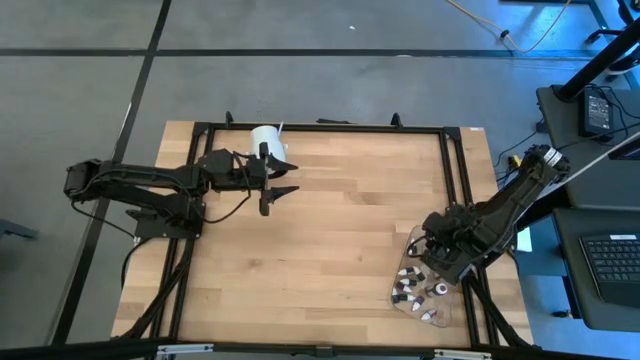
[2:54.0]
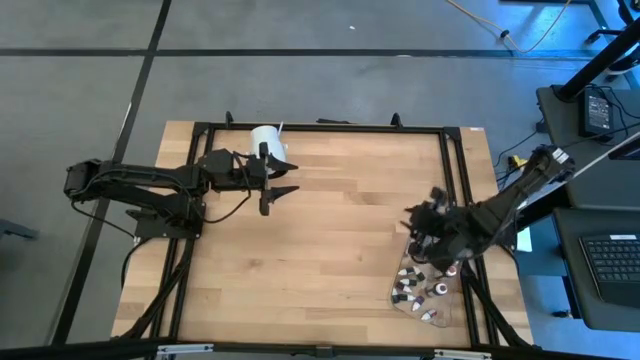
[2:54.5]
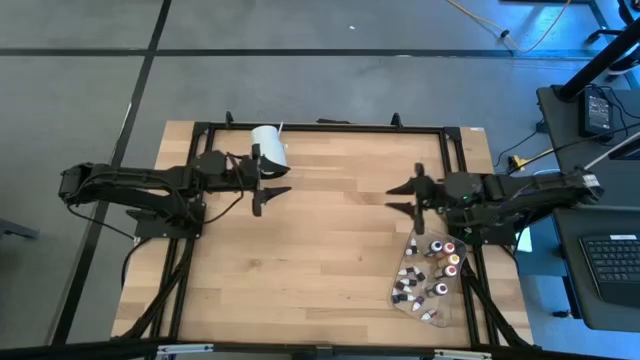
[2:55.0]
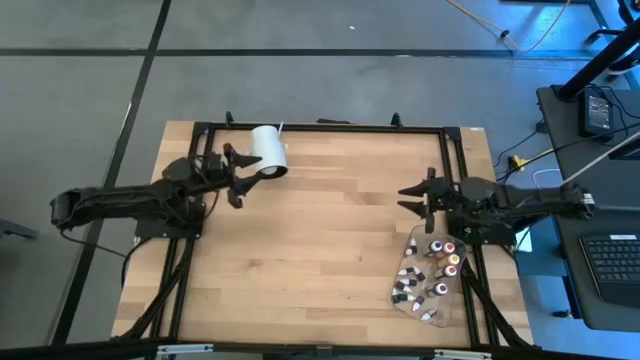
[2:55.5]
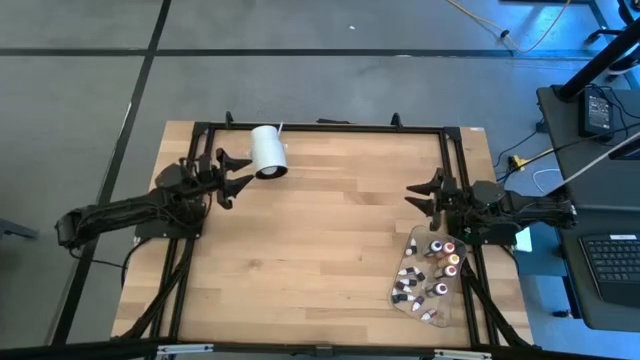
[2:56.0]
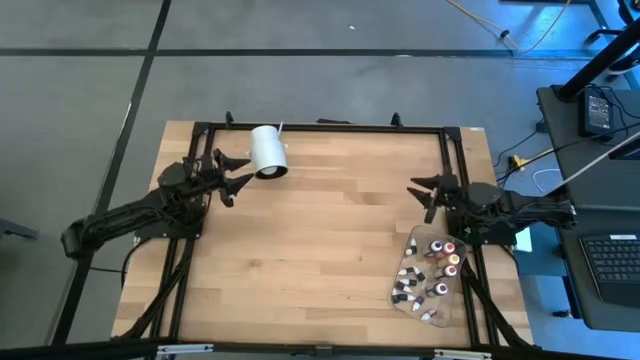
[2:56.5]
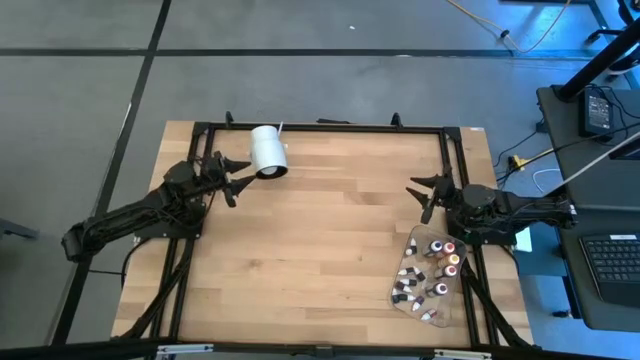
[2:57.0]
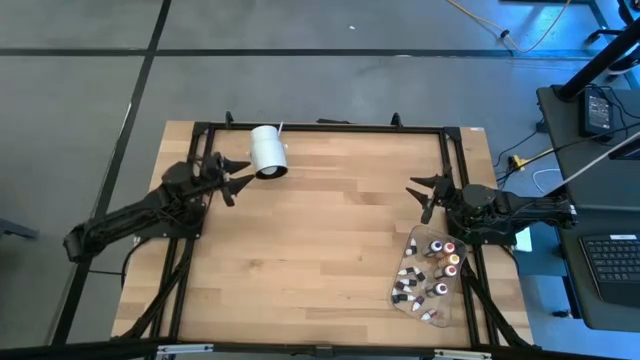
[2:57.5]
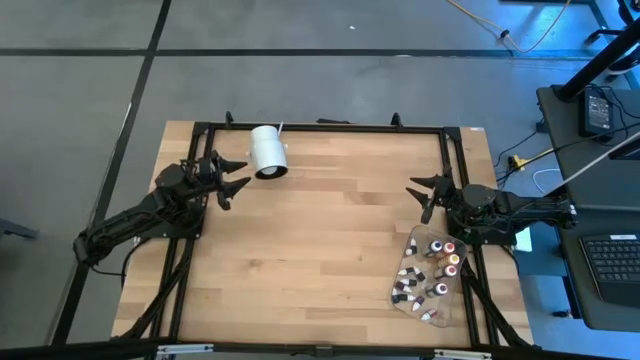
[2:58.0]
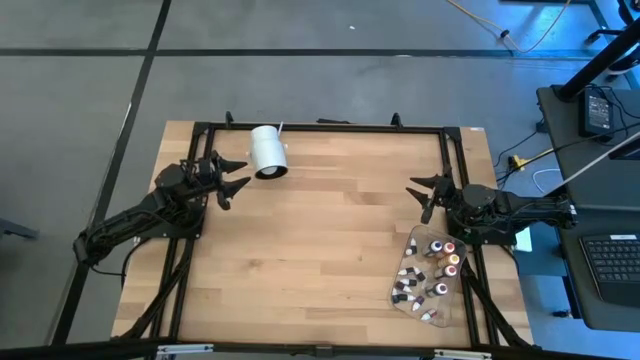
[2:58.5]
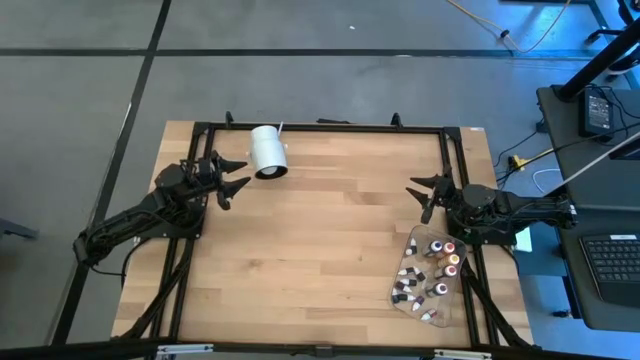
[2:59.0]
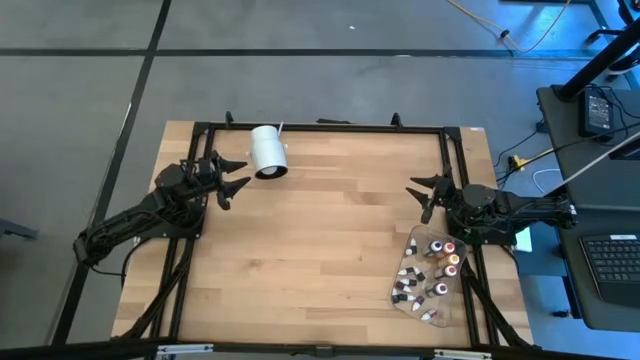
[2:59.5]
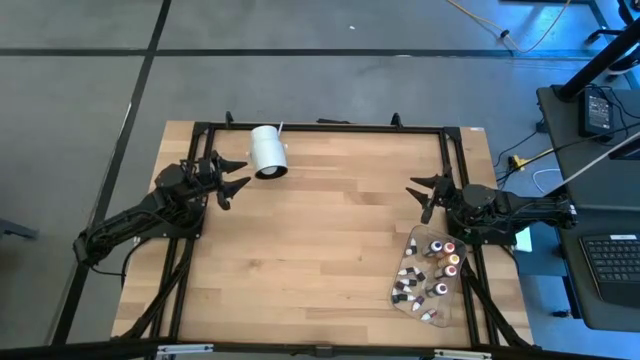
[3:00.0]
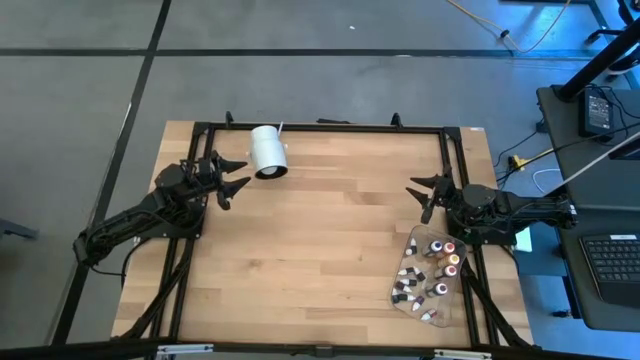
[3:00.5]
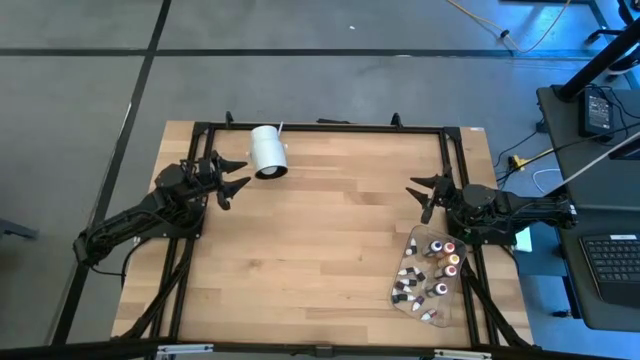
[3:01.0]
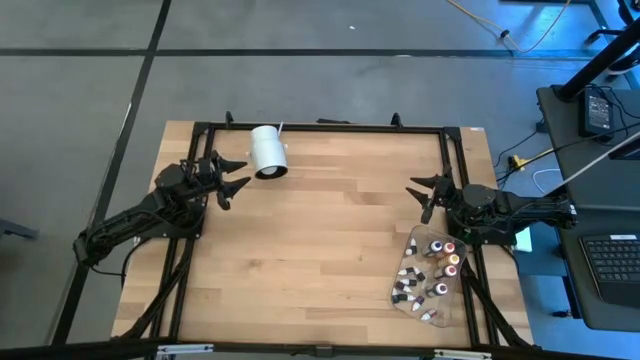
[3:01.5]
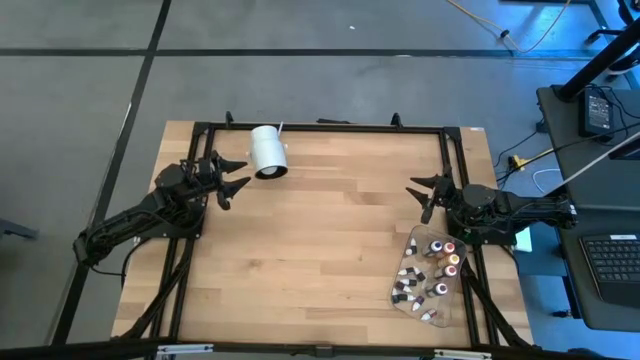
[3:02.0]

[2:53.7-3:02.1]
Task: Pick & Place food coloring
Return to Home Position

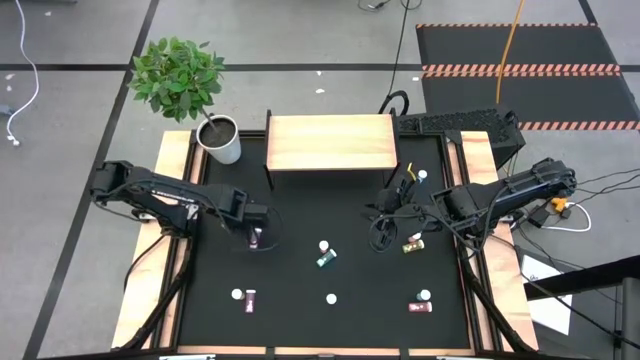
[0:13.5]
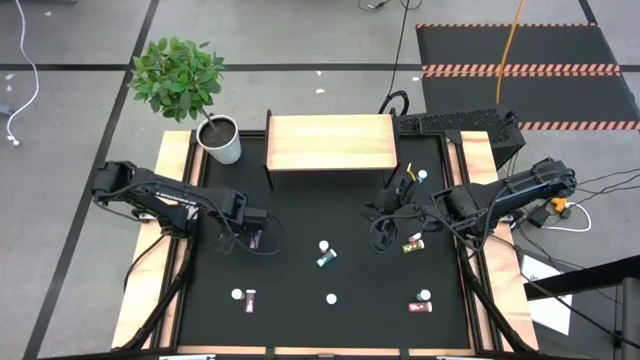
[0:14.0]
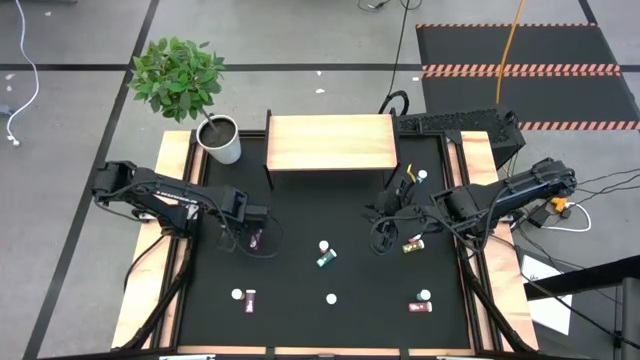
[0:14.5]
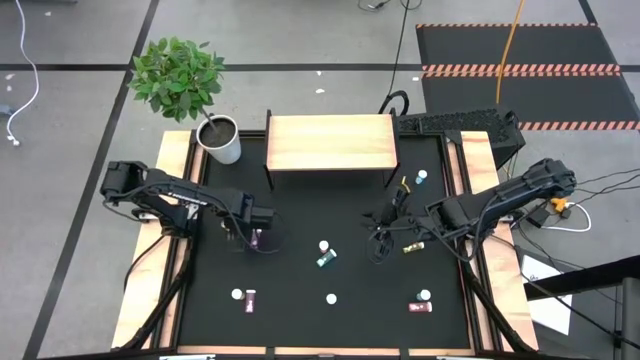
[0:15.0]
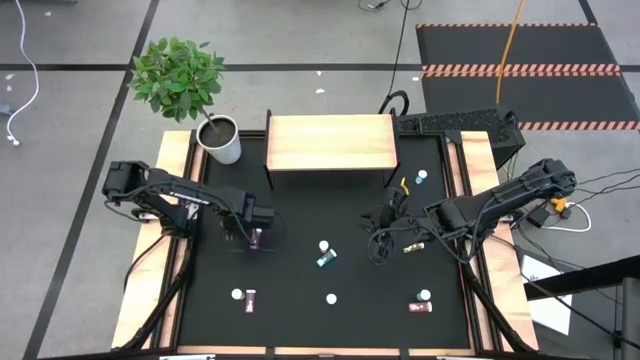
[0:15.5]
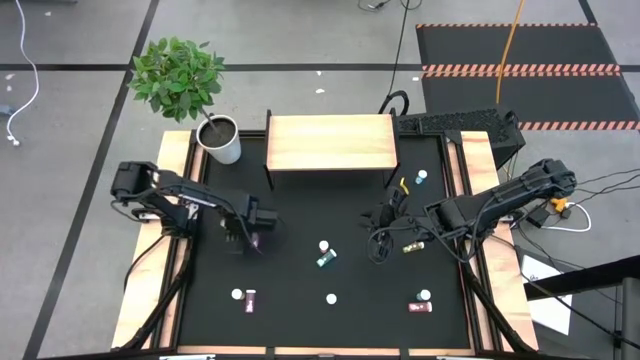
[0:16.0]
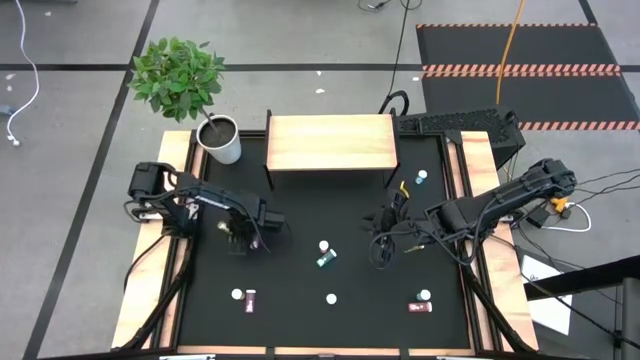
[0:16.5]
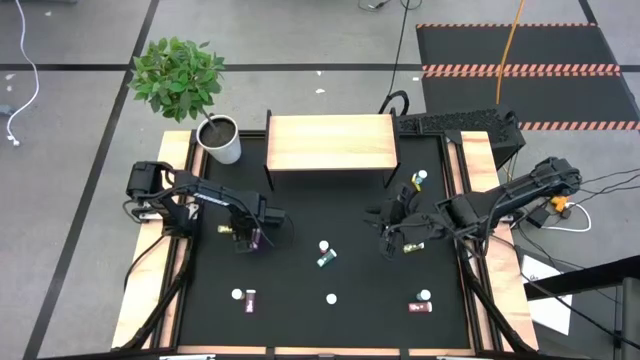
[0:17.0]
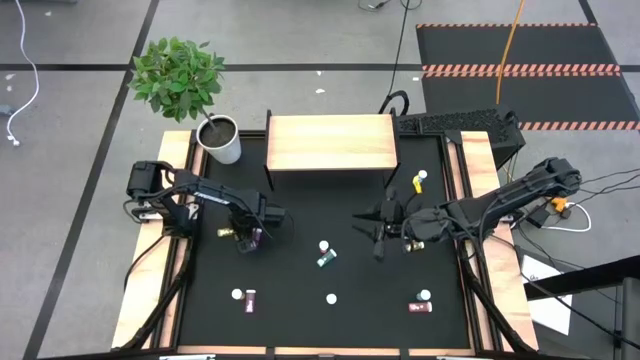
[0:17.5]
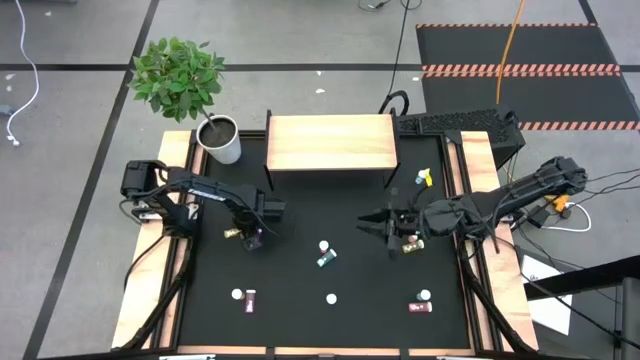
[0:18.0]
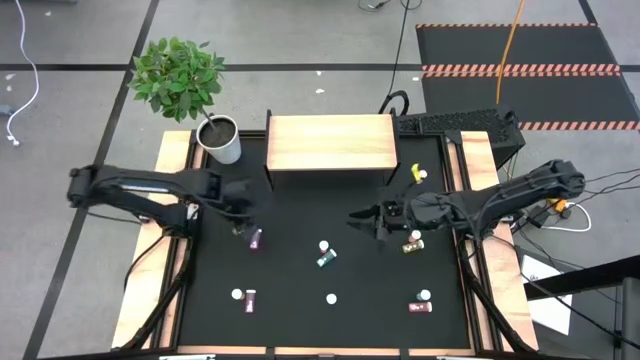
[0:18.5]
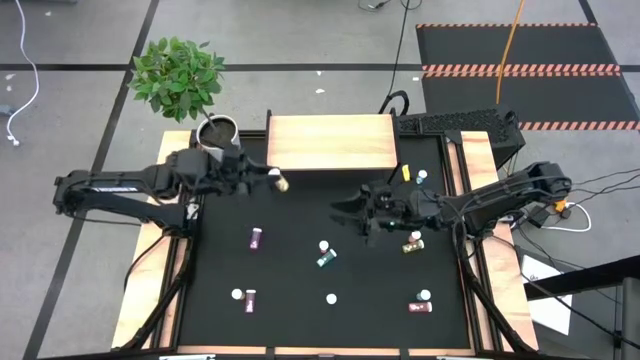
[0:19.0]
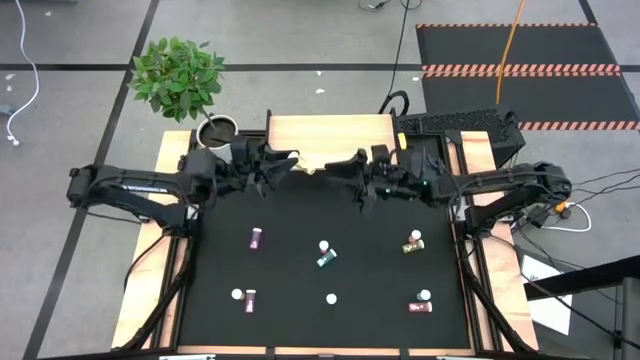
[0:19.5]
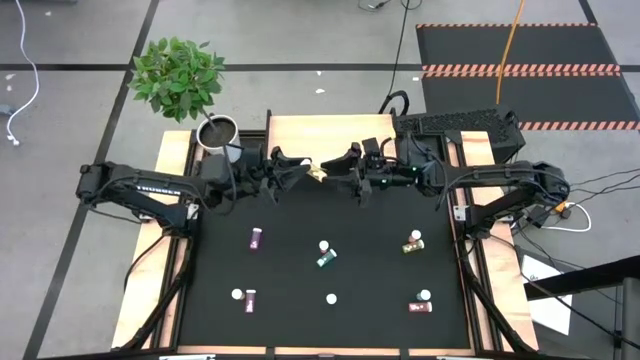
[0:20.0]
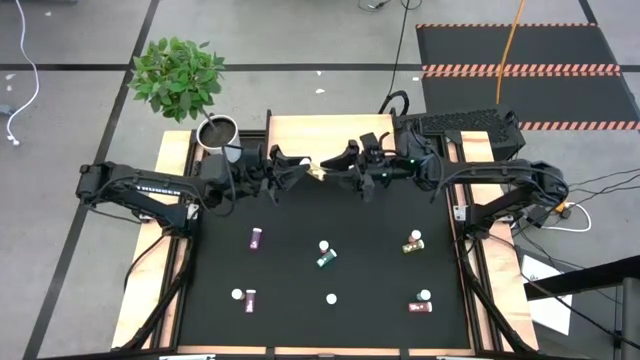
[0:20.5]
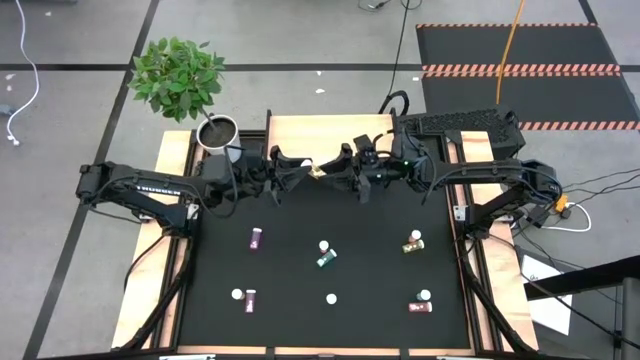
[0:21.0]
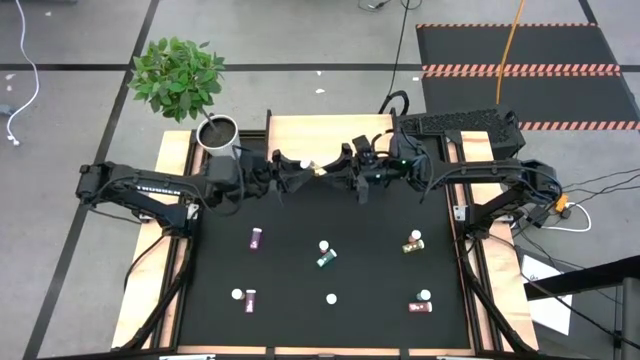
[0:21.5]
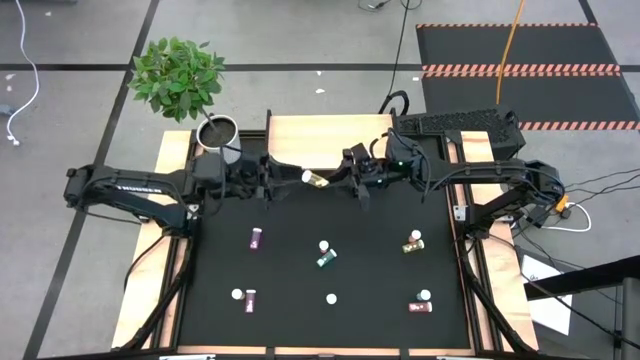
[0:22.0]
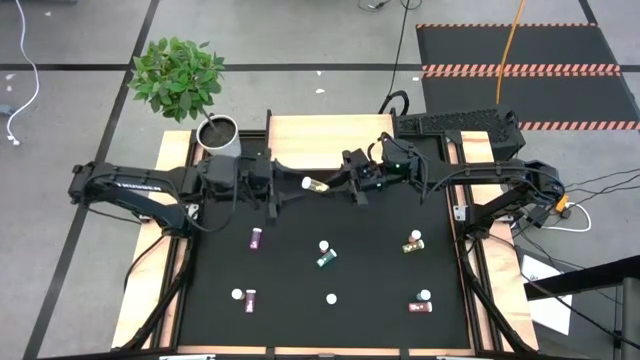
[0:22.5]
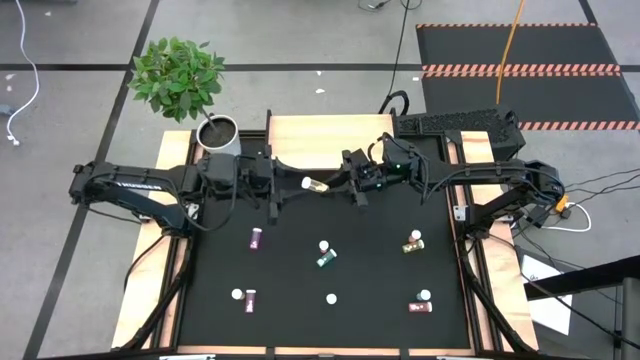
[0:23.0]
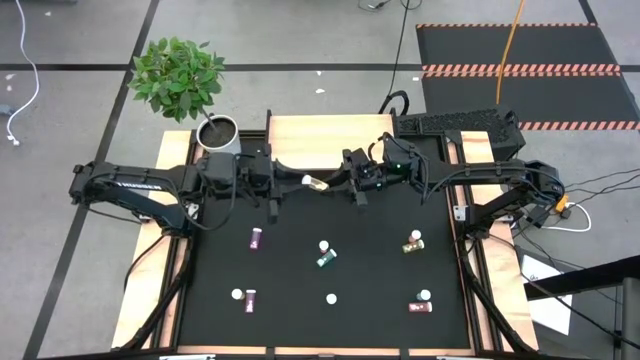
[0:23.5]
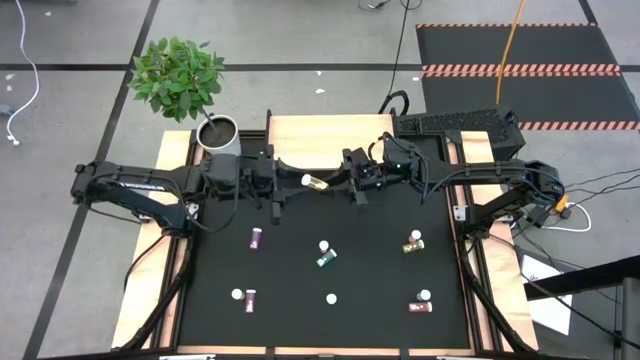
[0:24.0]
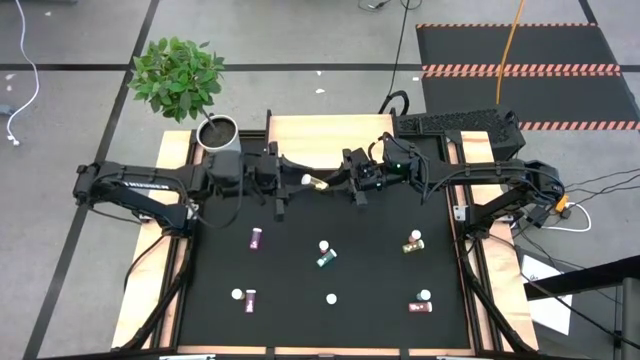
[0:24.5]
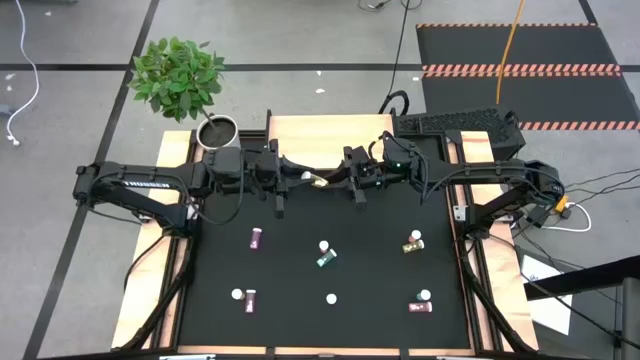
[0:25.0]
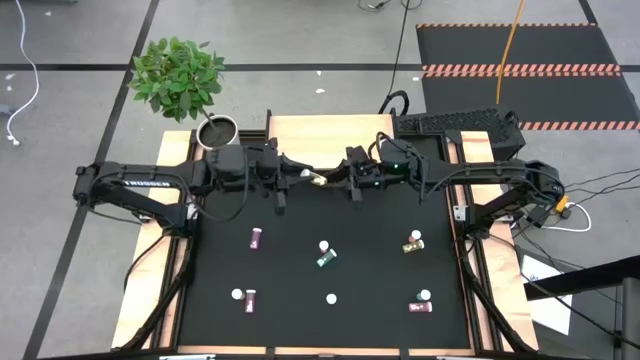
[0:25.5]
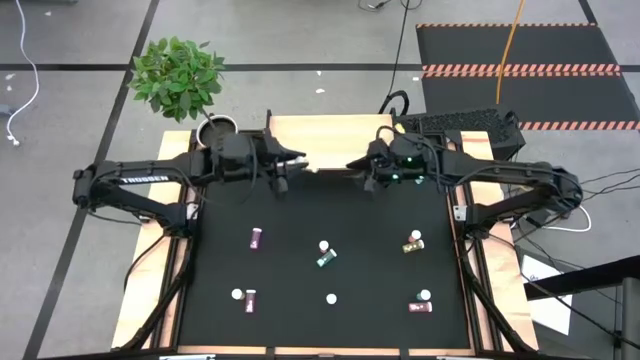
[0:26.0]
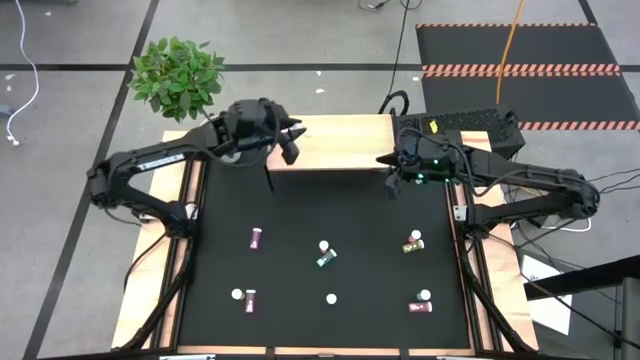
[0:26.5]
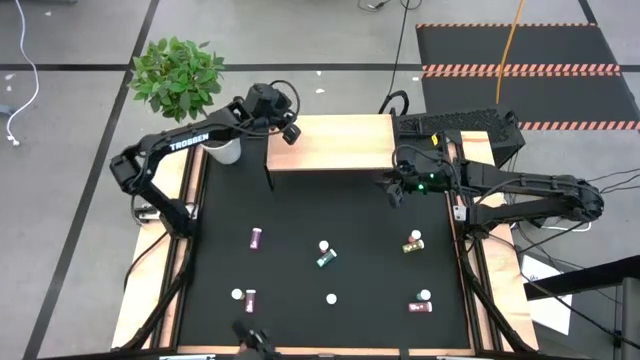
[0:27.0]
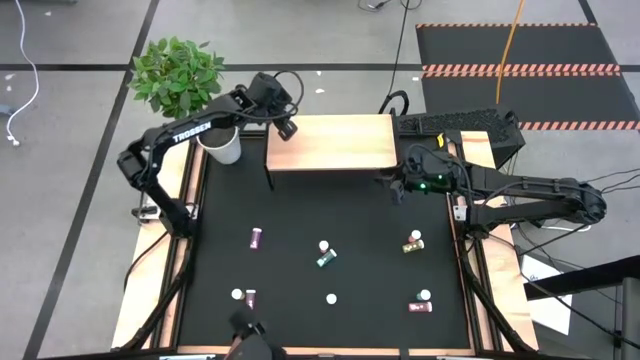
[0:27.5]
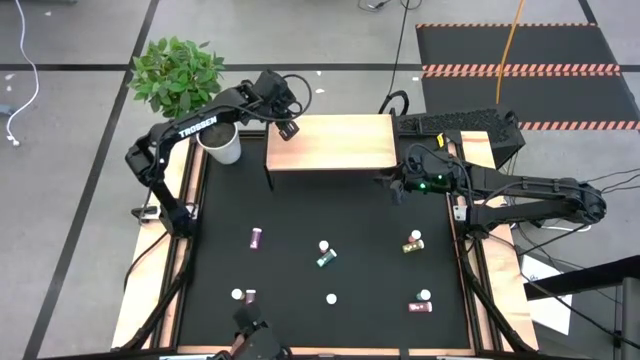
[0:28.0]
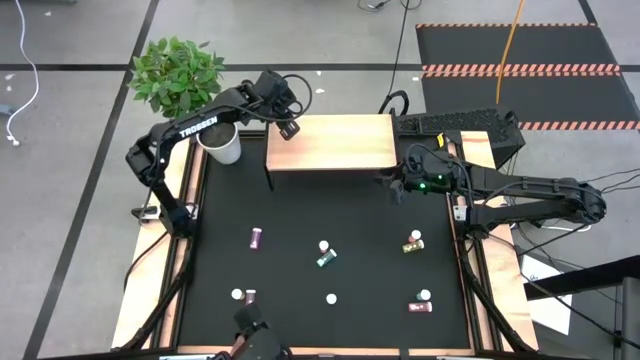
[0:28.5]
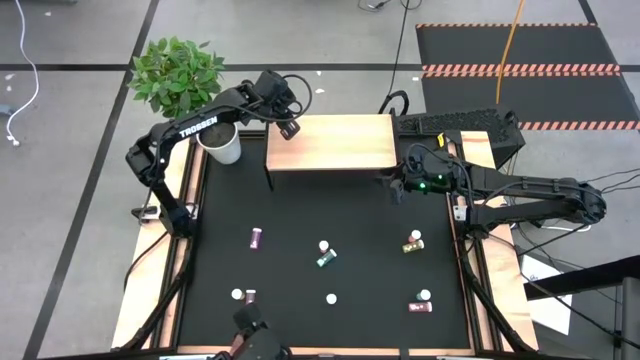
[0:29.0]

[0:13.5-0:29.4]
Task: Pick and place medicine bottles onto shelf by color
Put the top left yellow pill bottle on the shelf
